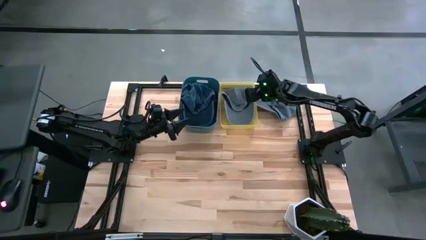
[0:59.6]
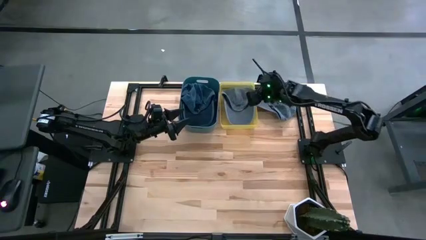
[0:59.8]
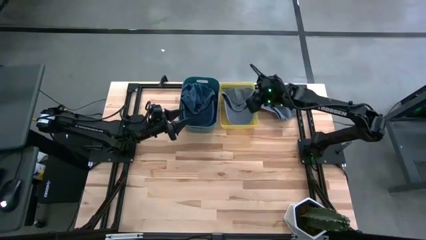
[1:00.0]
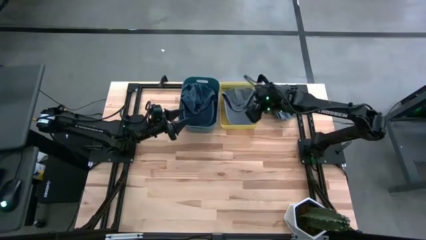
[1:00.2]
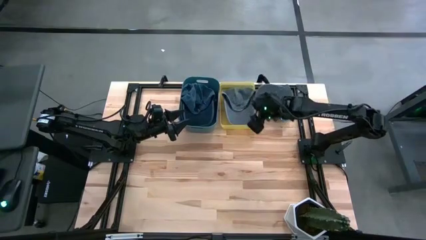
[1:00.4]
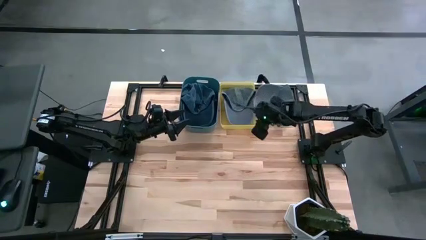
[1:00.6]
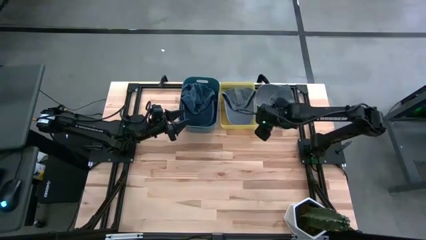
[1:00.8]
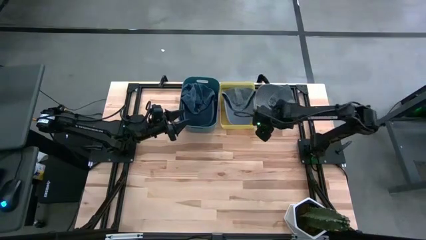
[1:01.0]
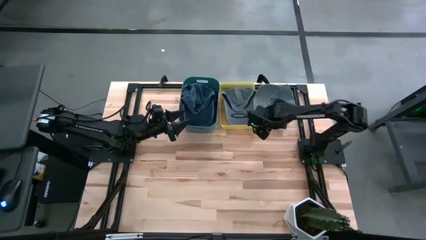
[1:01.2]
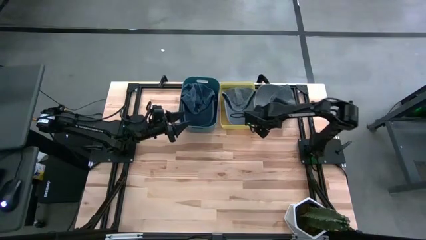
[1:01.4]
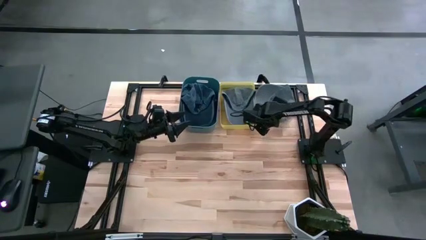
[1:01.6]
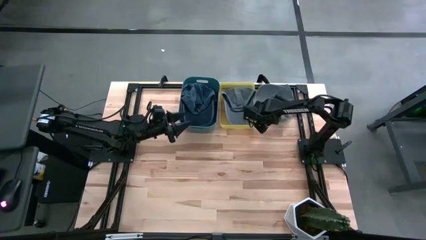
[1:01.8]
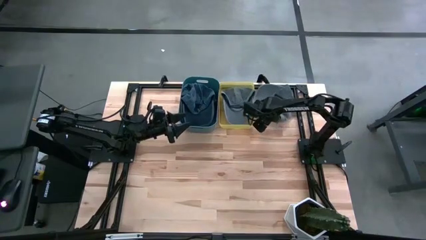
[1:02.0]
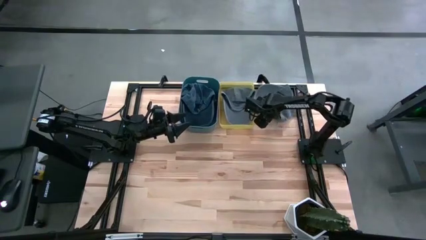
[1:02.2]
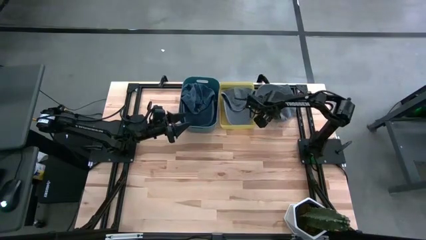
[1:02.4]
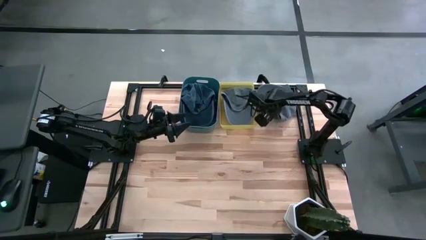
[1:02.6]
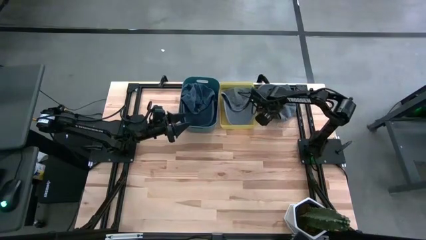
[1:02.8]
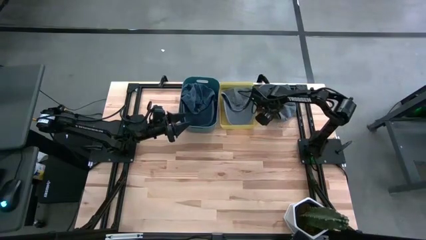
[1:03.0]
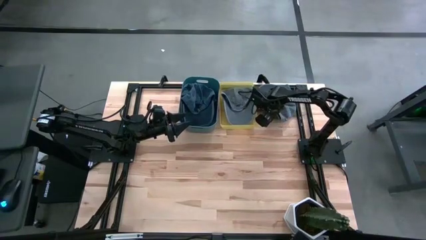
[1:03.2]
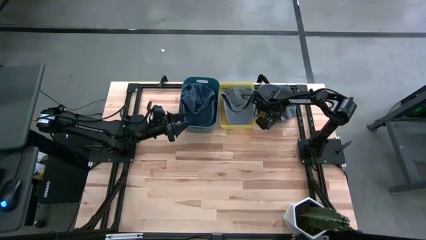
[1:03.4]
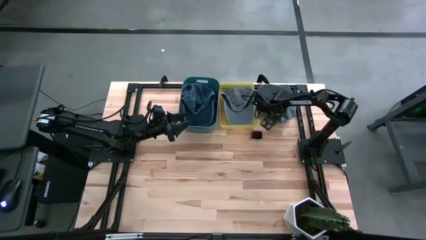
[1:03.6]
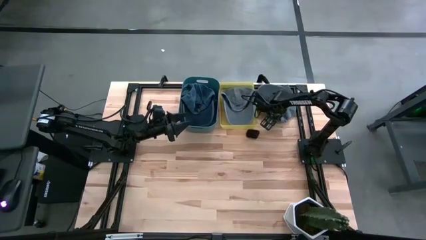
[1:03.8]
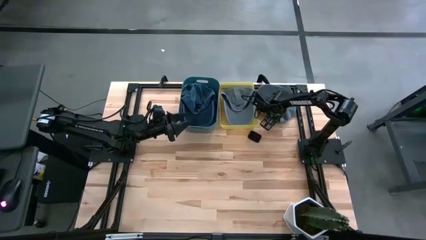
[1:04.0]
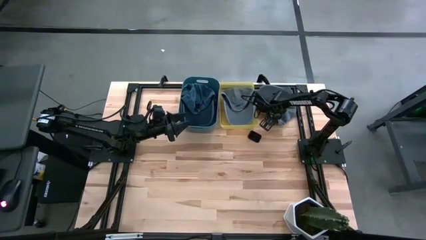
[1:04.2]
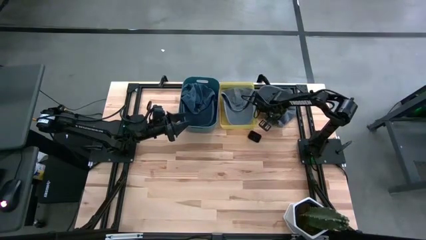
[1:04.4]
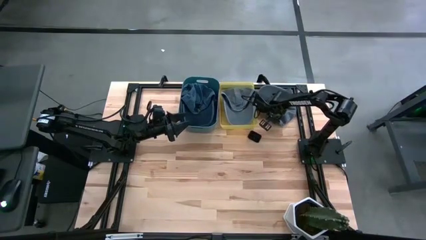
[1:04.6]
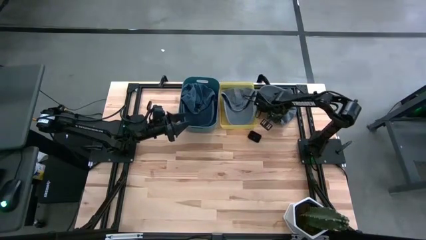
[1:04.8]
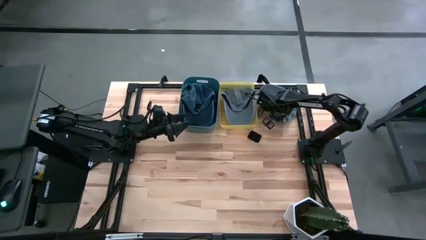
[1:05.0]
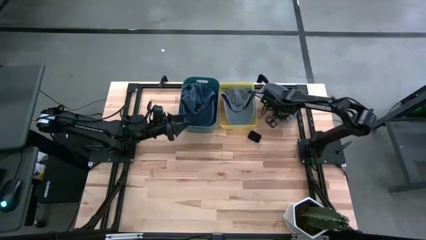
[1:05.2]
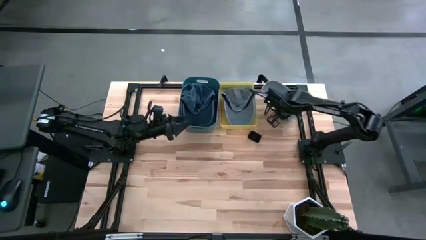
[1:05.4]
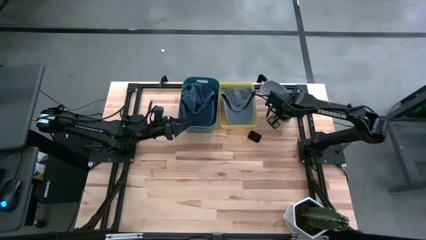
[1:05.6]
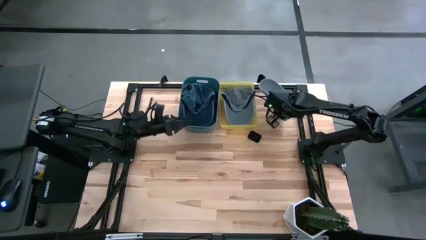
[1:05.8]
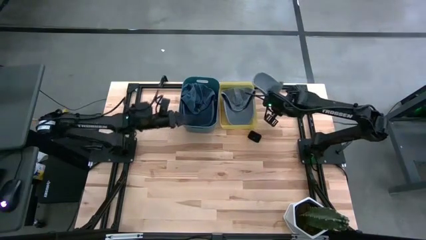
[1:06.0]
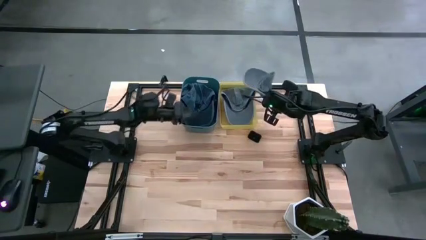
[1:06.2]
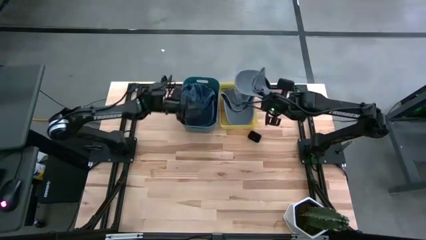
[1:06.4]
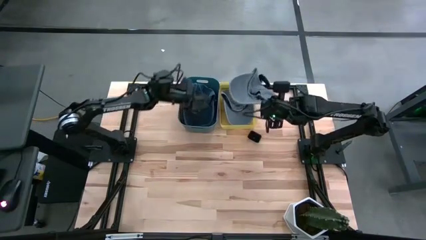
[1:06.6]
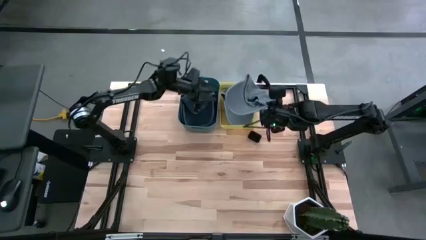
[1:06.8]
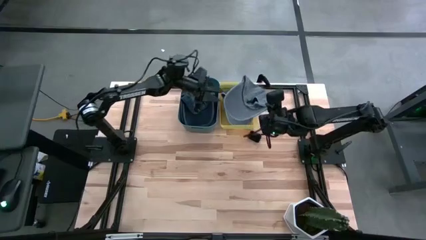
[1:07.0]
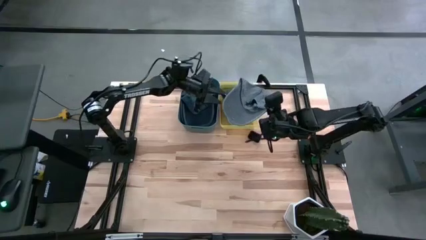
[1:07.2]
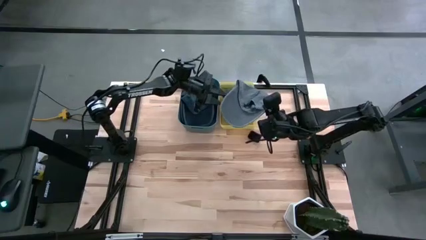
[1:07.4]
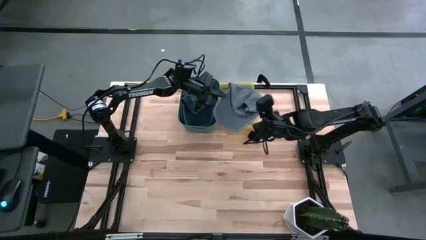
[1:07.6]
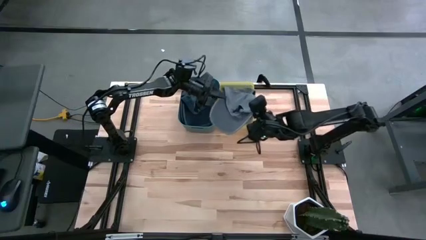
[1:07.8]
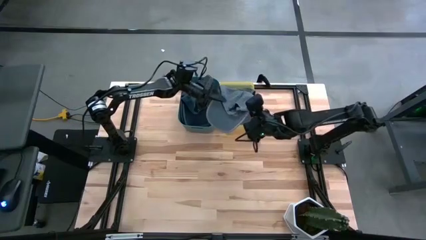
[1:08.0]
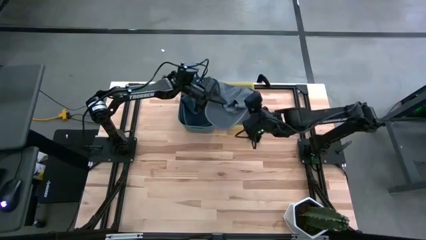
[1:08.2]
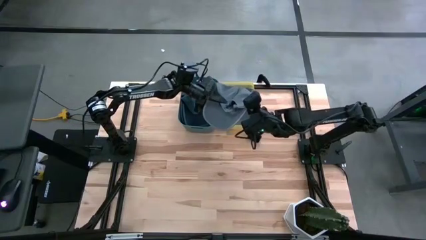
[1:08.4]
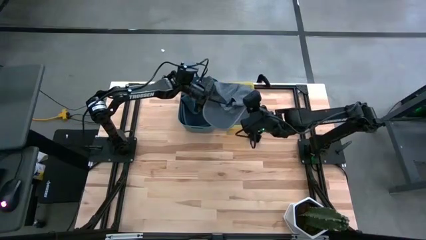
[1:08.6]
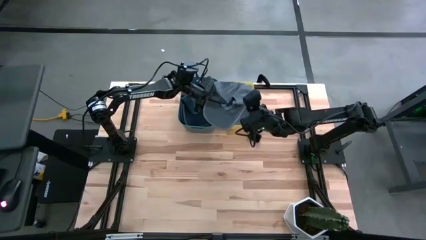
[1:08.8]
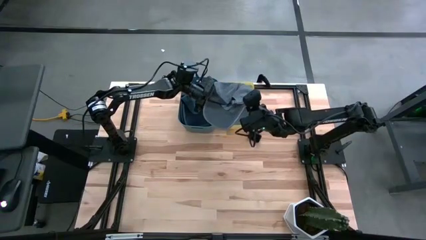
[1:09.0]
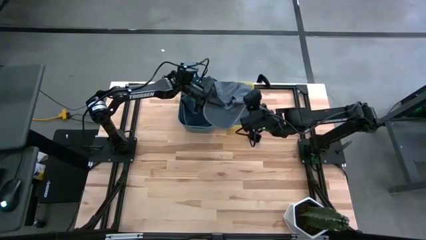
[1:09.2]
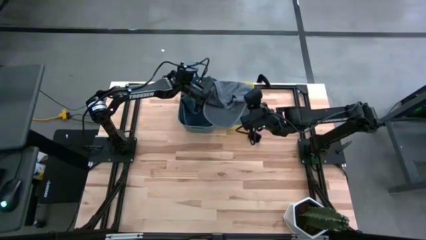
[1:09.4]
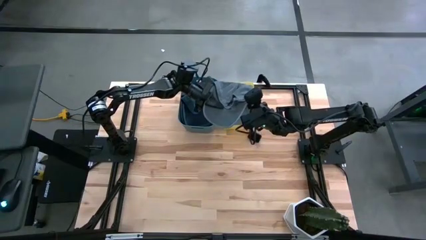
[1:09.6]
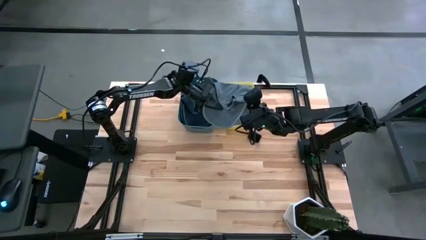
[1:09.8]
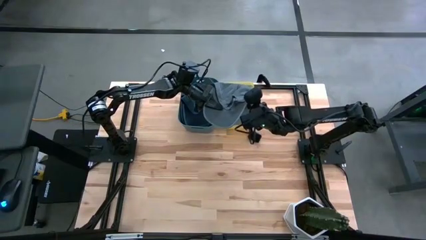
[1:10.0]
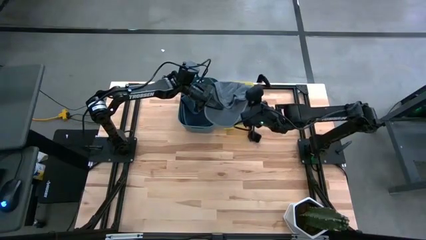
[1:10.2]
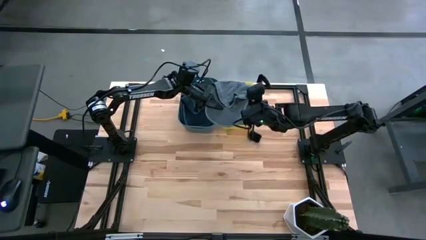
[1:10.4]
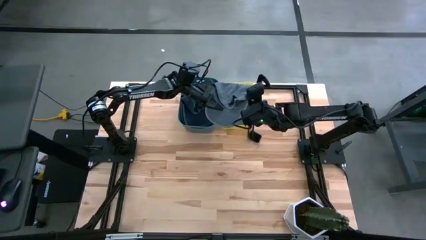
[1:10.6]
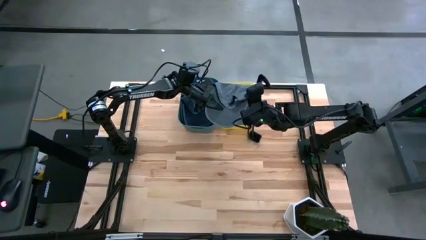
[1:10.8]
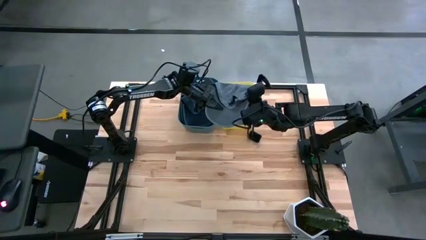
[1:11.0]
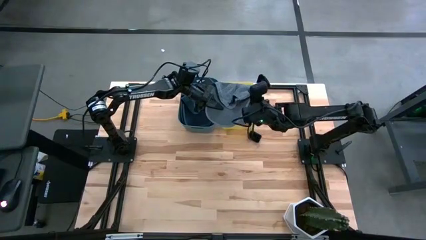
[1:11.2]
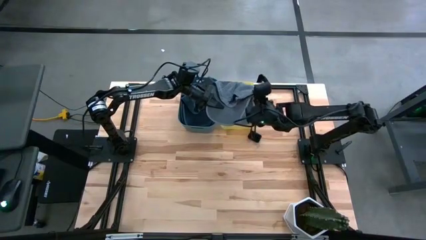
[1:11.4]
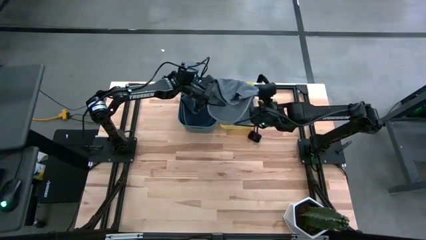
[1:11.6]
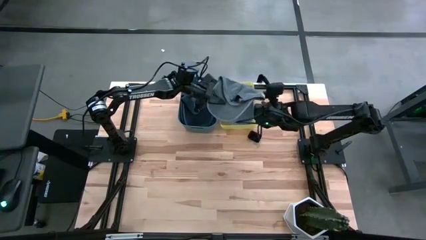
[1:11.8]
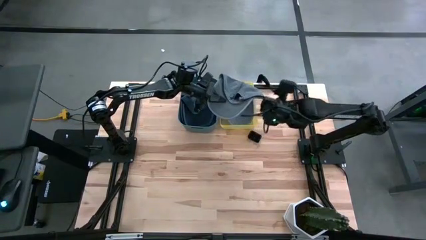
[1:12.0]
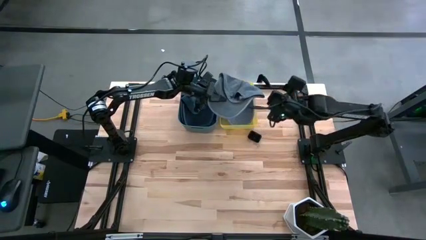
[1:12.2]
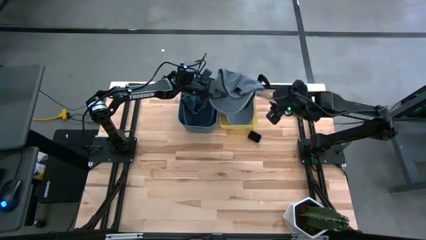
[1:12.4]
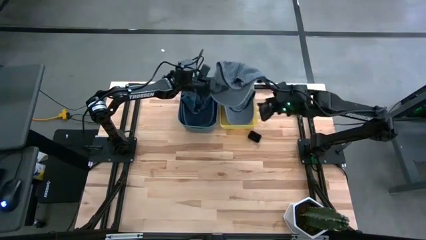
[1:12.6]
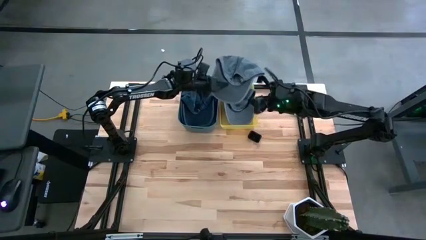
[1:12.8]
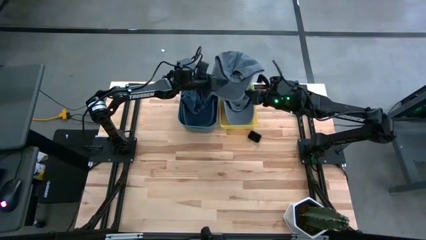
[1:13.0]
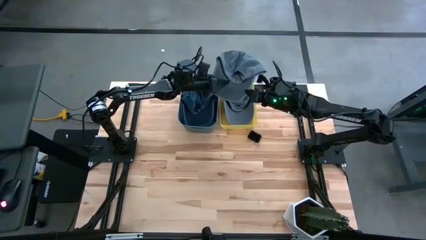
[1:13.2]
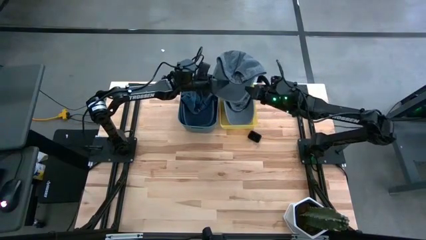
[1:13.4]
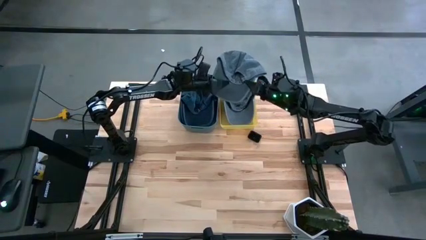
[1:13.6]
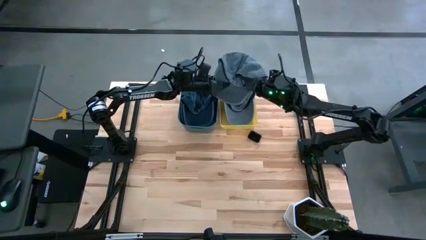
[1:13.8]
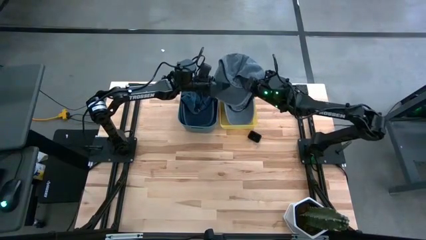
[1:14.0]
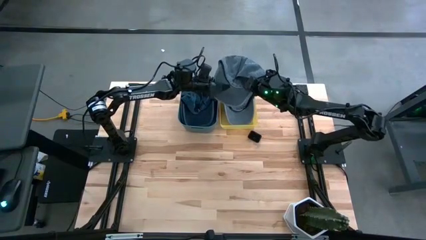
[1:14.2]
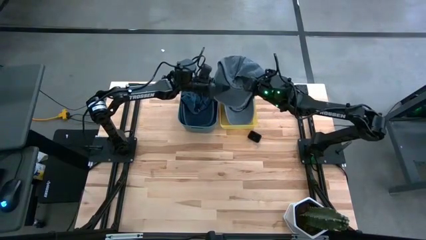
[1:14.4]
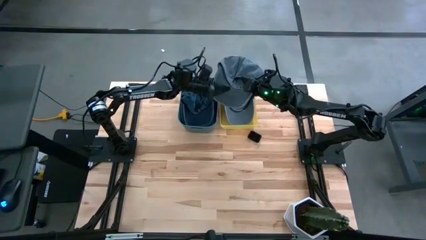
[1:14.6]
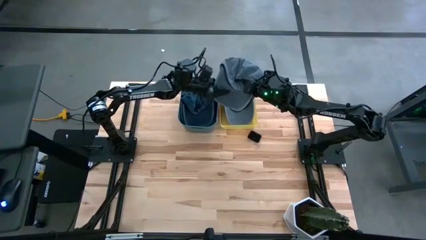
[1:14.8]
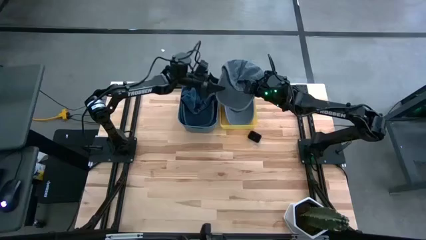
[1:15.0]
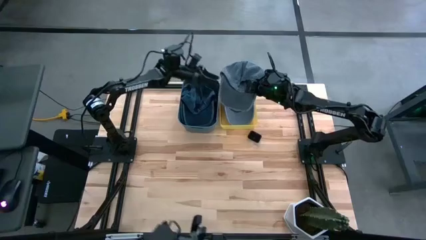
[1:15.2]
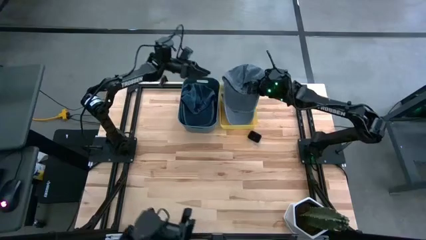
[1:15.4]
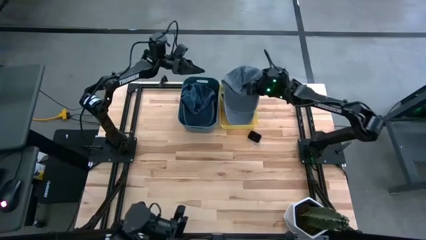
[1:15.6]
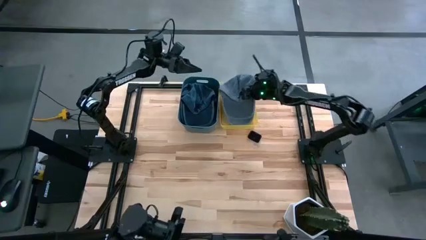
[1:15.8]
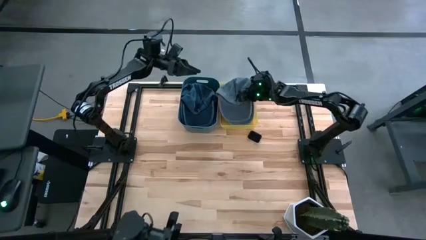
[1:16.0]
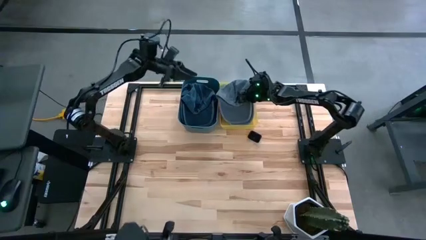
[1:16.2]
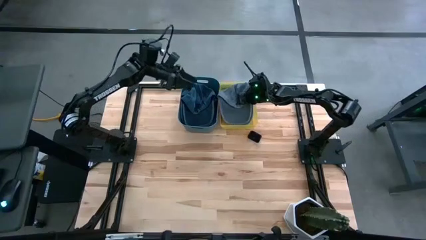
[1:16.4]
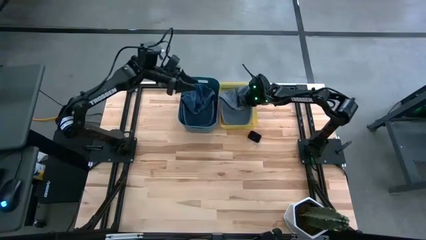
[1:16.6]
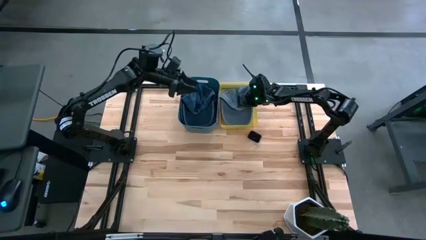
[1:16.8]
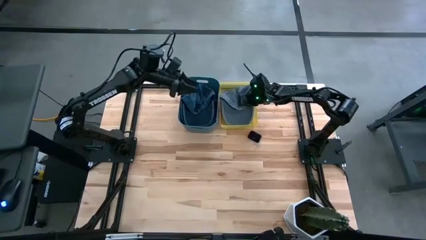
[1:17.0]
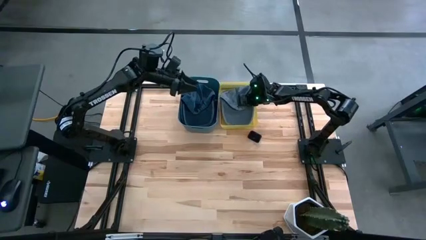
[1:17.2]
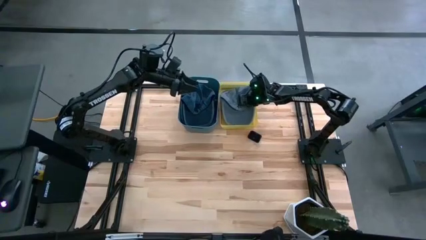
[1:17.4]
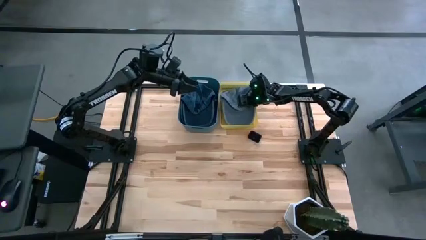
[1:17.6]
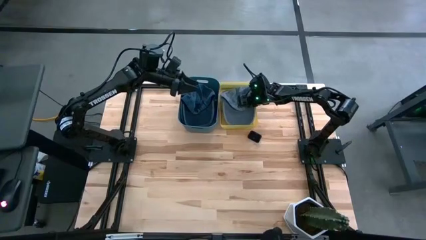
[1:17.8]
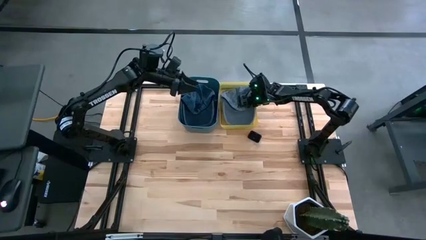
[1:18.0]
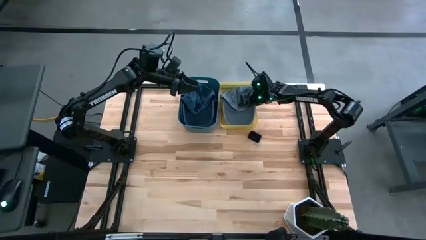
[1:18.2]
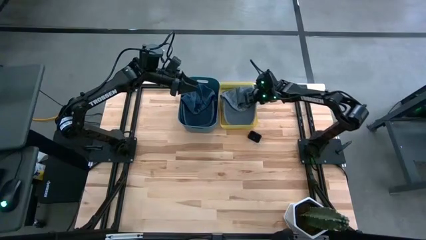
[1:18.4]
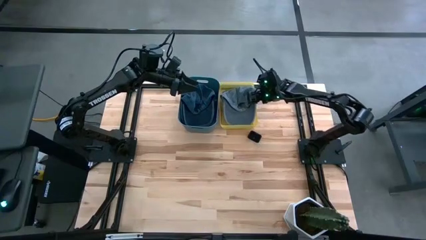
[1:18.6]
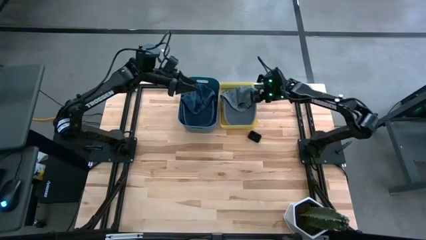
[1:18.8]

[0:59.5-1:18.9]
Task: Pick & Place hat
Put the gray cap into the yellow bin
